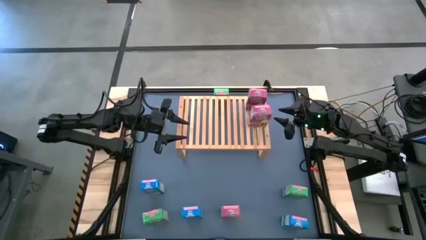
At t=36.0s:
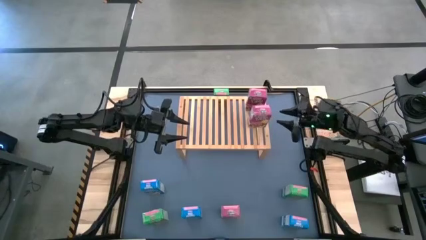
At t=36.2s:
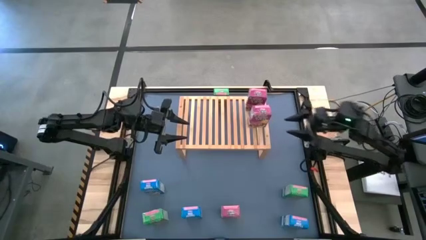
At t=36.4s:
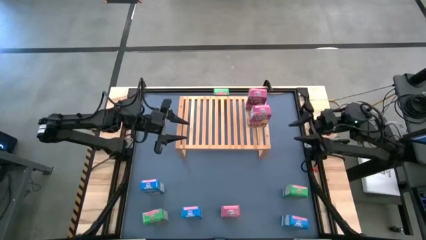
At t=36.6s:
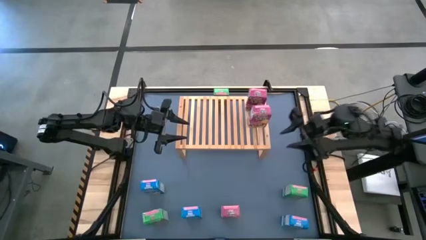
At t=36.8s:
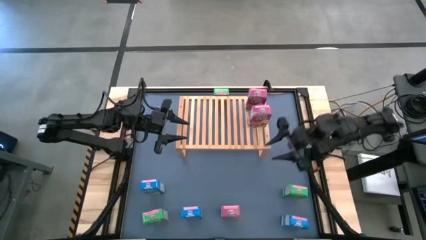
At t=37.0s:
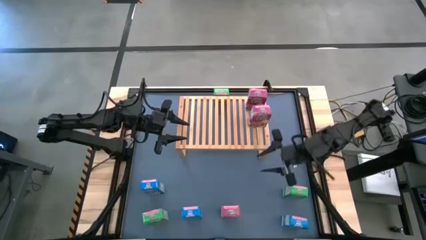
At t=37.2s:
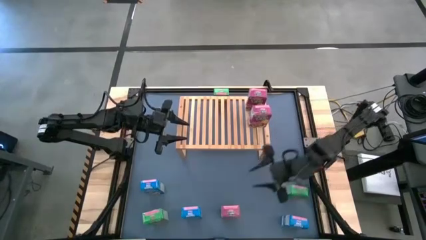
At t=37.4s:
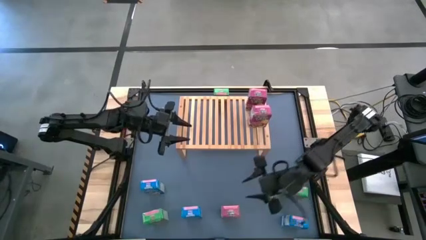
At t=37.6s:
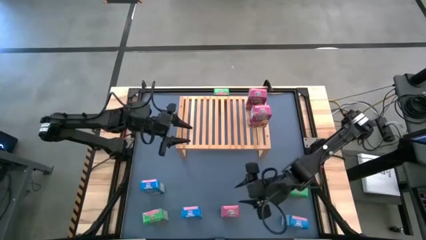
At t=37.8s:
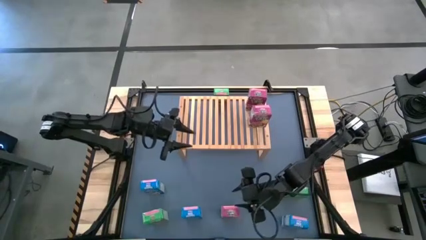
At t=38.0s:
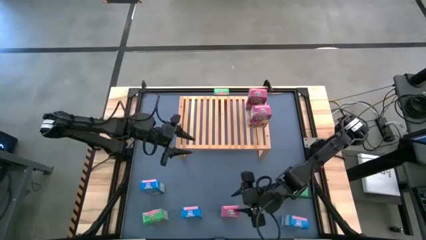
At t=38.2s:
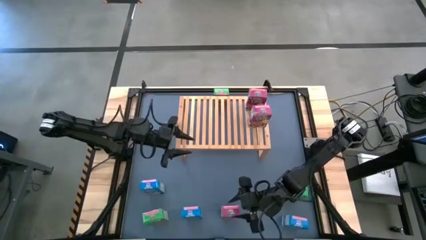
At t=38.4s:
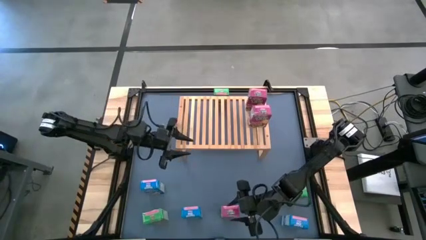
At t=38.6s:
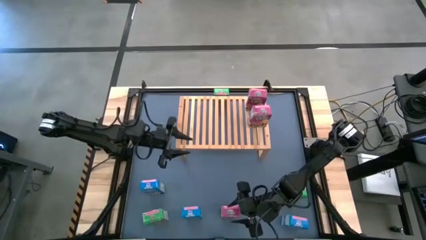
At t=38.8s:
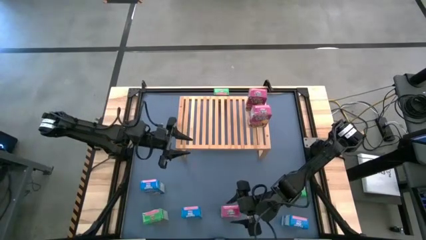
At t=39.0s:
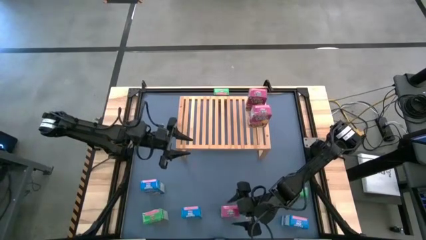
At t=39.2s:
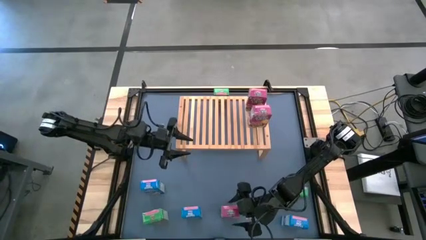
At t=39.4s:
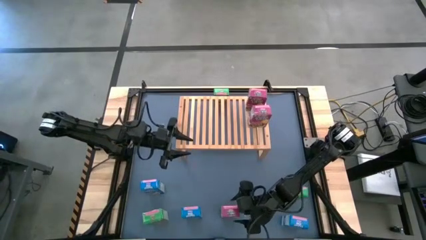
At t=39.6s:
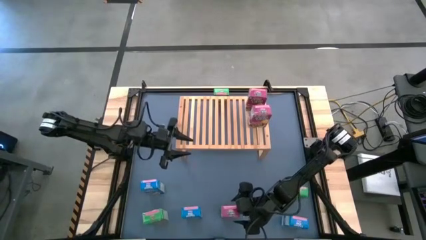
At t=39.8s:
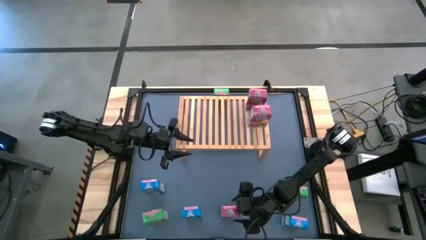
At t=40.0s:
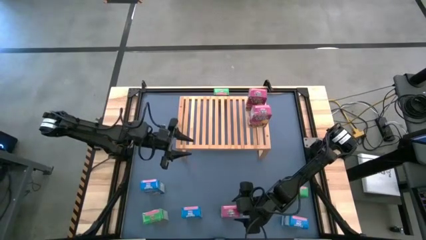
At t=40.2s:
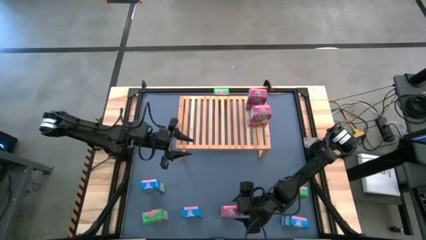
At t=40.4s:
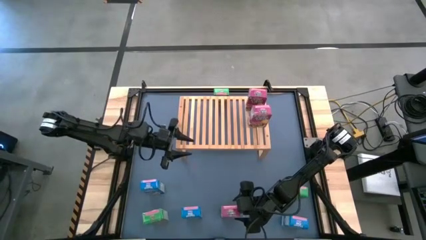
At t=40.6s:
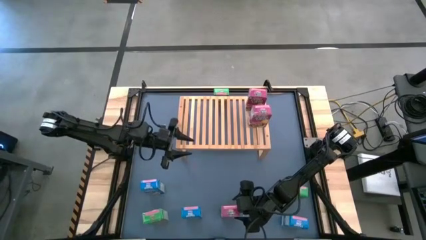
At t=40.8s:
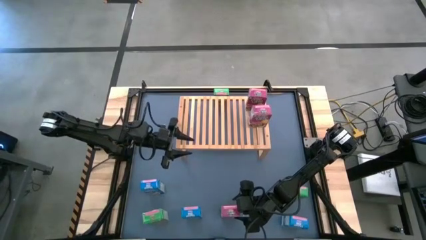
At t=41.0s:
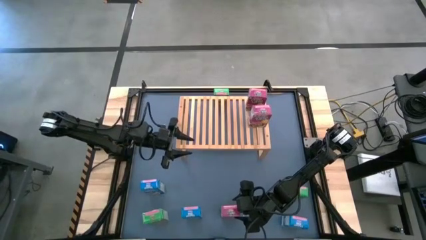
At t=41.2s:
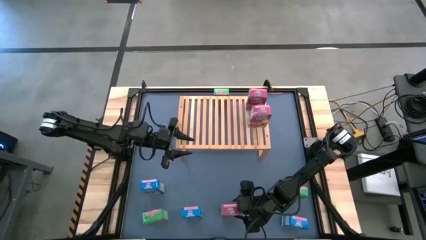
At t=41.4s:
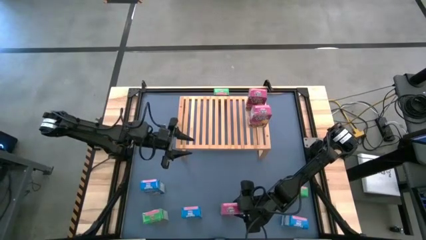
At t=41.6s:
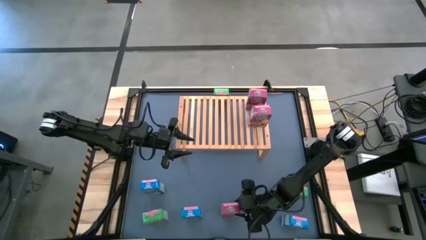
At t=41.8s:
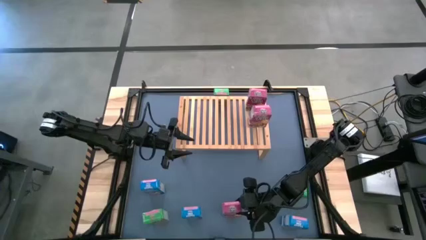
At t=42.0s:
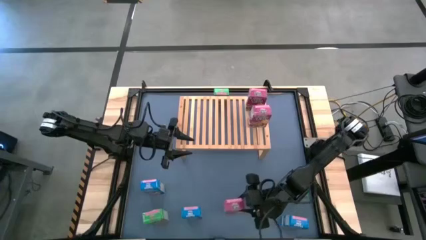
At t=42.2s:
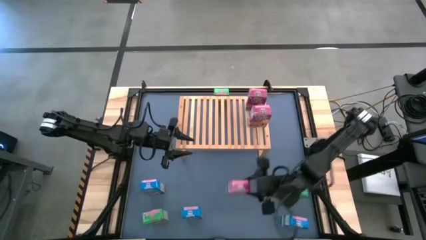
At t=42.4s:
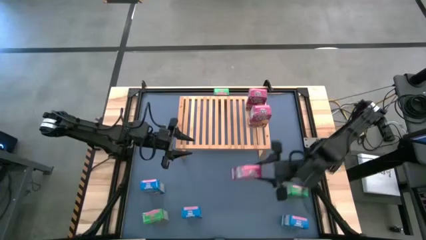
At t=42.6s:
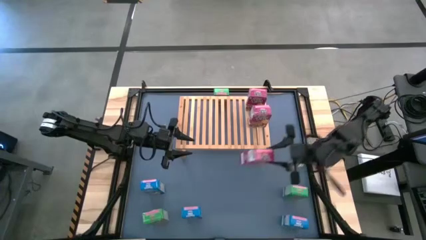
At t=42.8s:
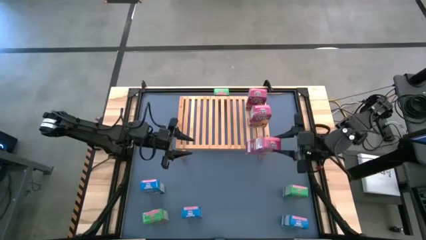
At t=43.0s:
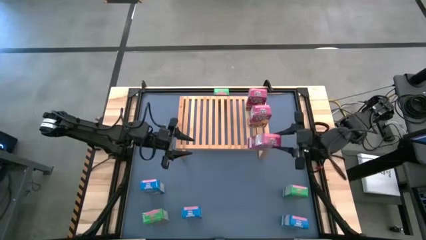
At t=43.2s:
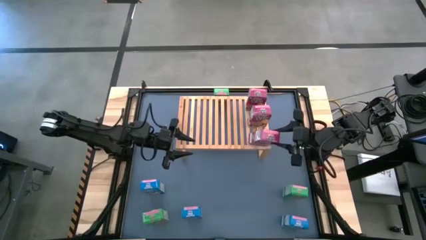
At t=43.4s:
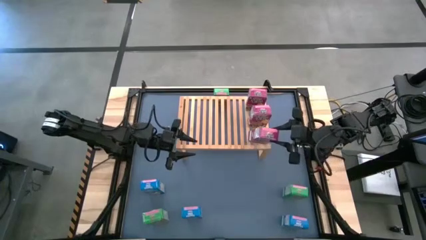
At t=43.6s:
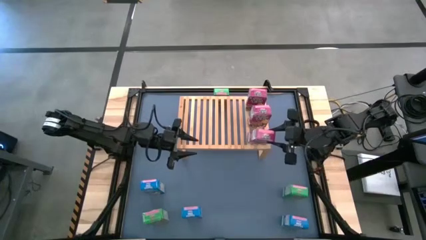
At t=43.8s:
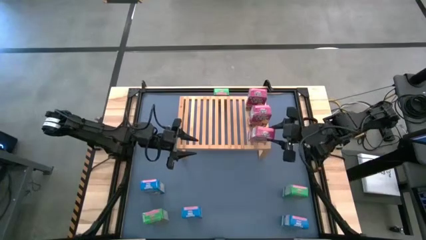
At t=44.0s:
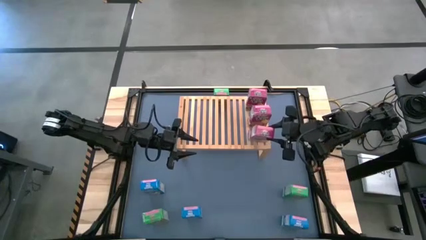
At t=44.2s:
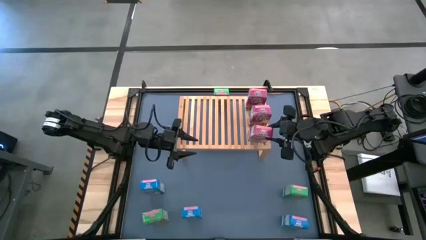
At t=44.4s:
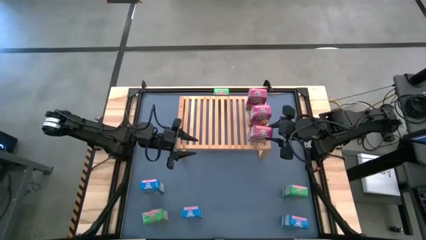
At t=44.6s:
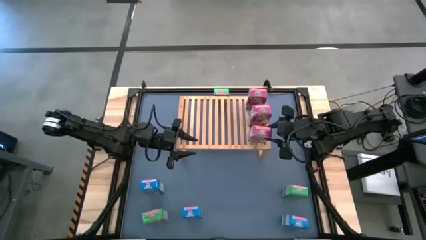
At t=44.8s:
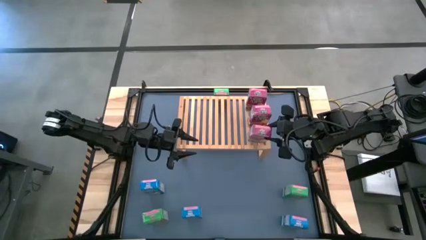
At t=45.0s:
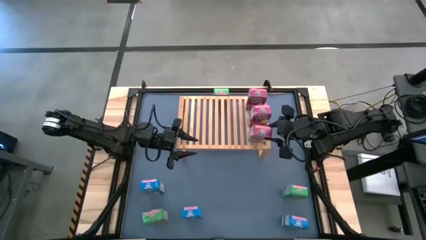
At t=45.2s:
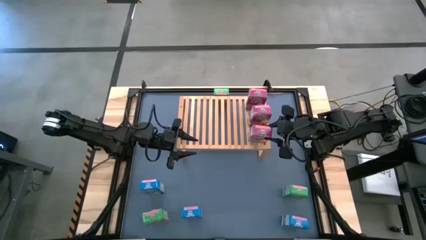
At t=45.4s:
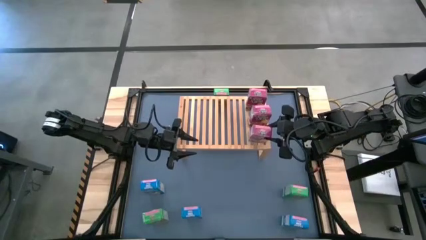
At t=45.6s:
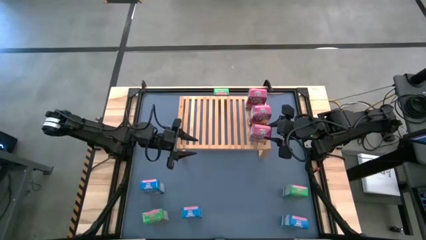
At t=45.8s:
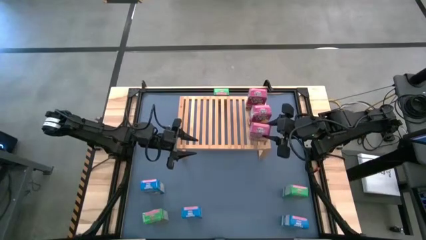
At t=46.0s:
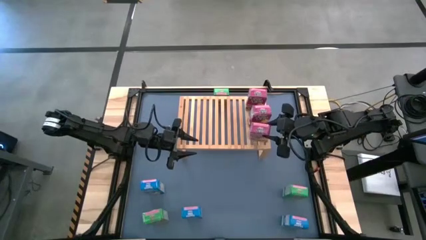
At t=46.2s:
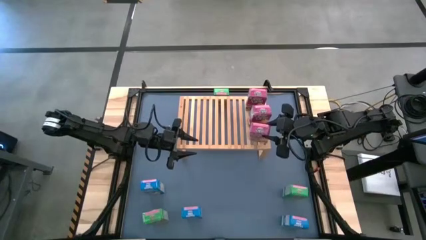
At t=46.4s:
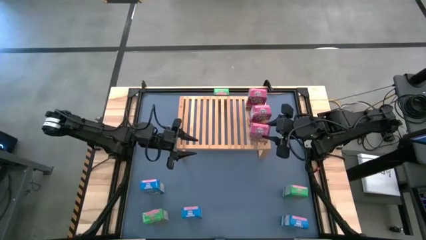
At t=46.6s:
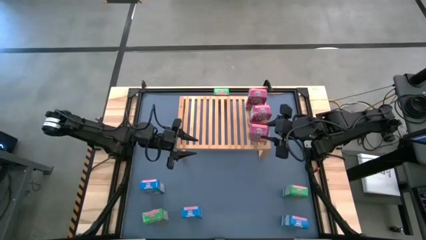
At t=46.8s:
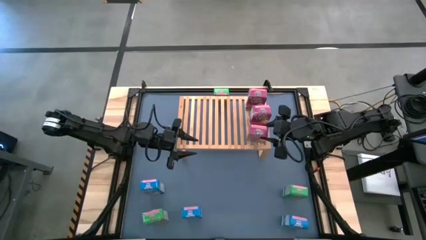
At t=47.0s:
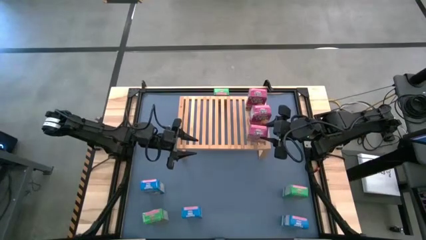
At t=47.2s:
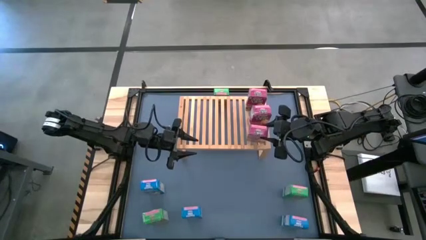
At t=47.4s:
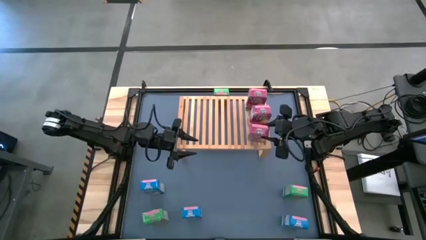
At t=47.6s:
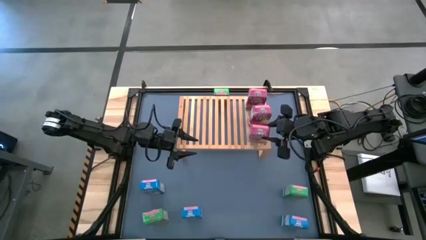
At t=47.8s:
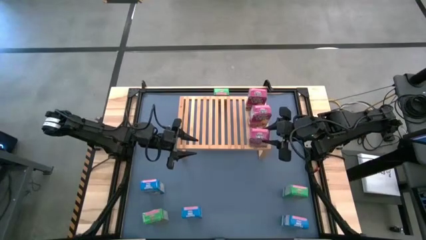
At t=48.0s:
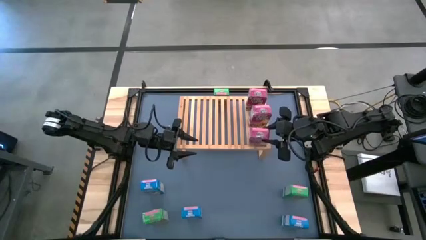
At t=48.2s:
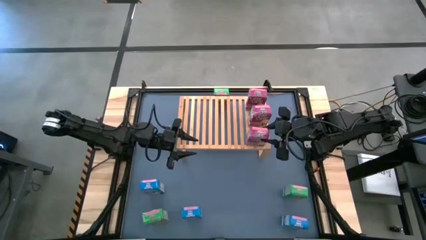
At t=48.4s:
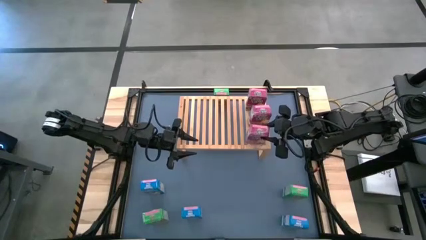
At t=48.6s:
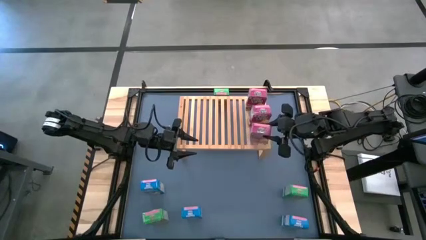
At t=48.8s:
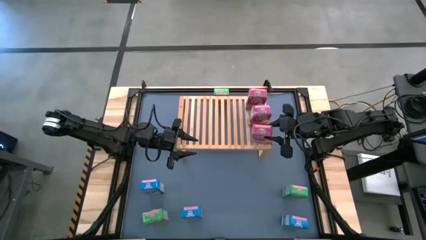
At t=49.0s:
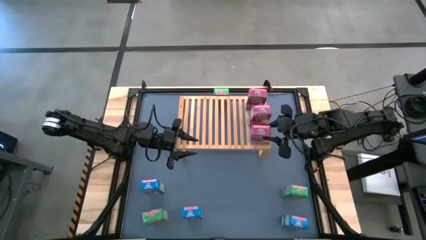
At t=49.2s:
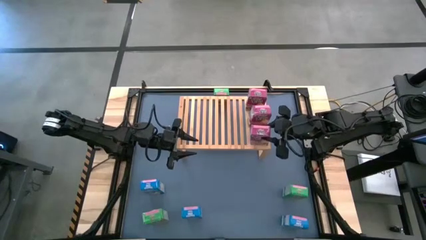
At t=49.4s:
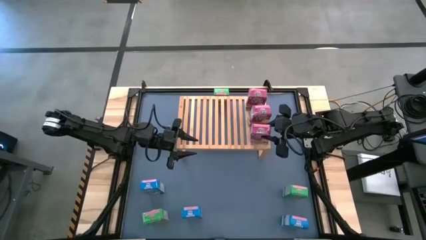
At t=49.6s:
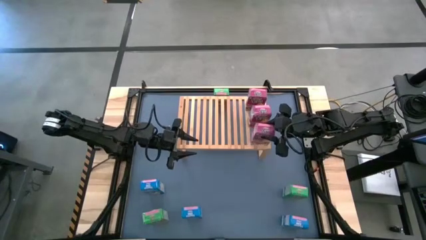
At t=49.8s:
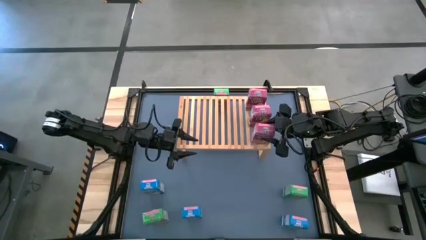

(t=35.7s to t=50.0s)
Task: Stack cereal on shelf
Put the pink cereal box on the shelf

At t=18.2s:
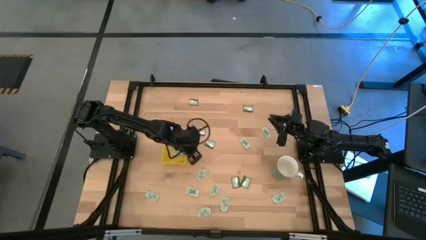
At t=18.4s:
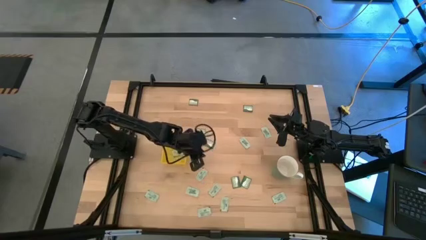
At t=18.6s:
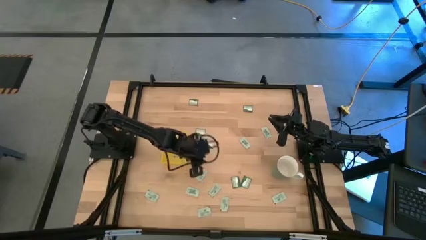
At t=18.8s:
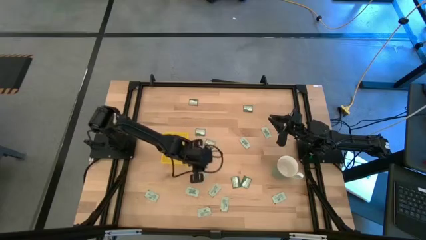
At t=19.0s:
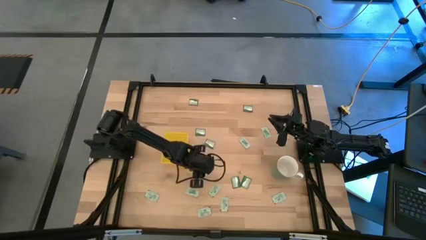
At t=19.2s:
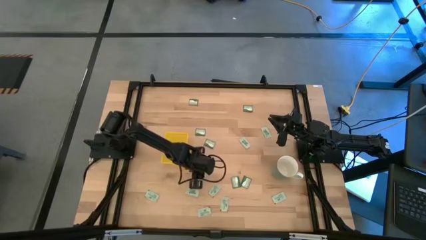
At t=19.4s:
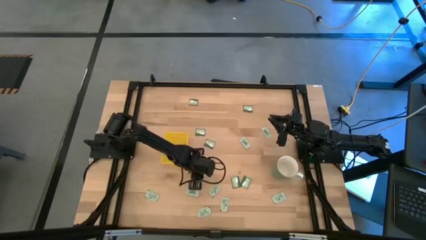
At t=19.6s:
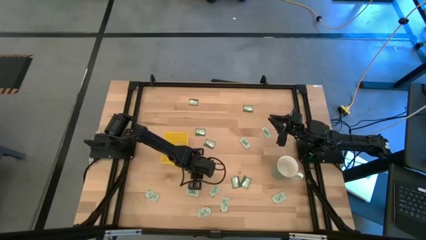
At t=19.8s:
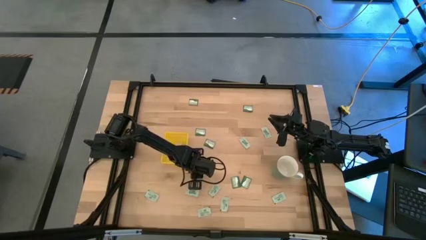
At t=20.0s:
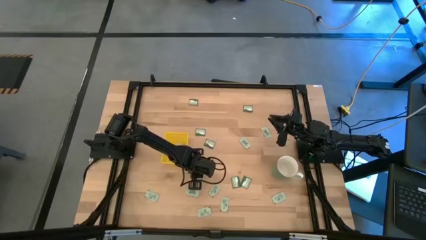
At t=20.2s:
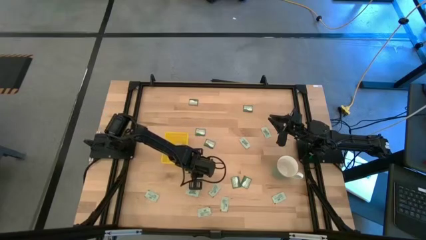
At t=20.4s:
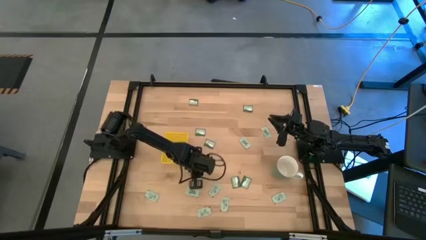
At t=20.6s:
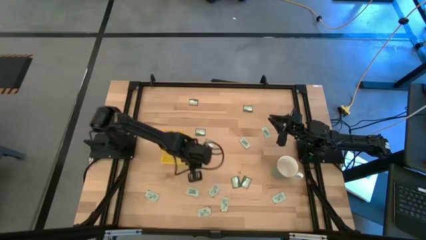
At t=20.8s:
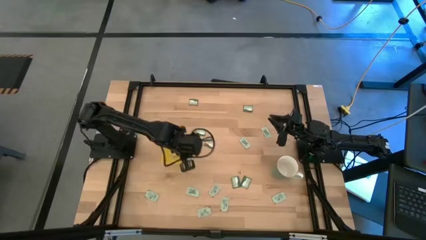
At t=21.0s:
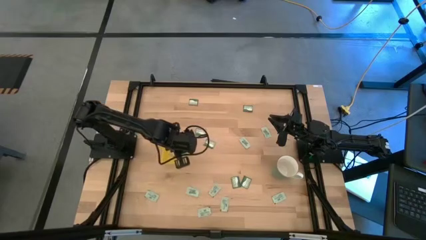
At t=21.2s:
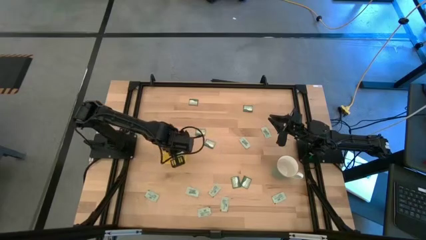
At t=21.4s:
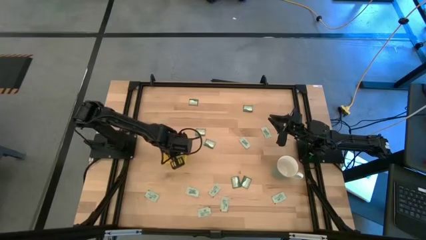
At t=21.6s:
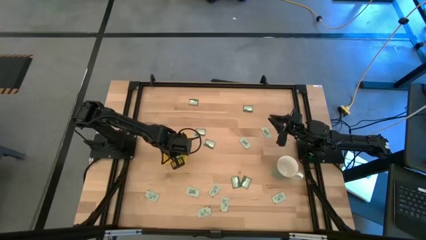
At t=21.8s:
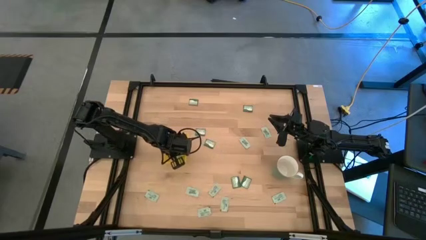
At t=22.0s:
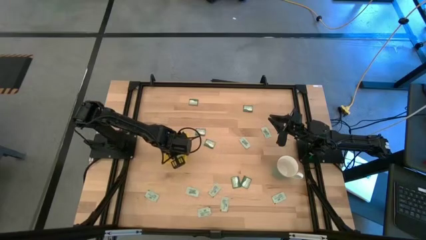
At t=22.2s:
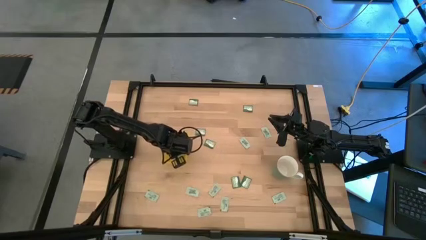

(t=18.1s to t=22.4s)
Task: Pick and place Stevia / Truvia into bins
Put the white packet into the yellow bin
